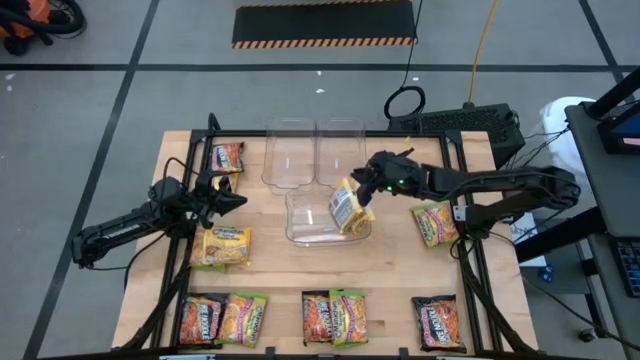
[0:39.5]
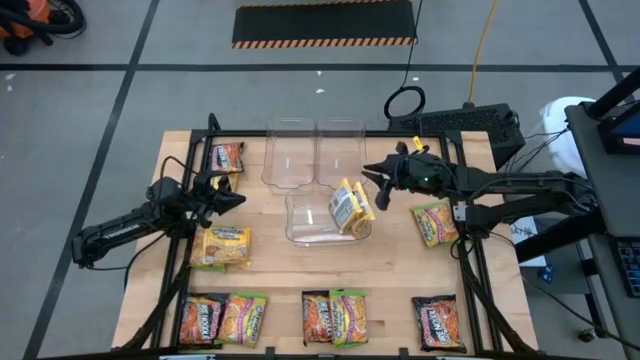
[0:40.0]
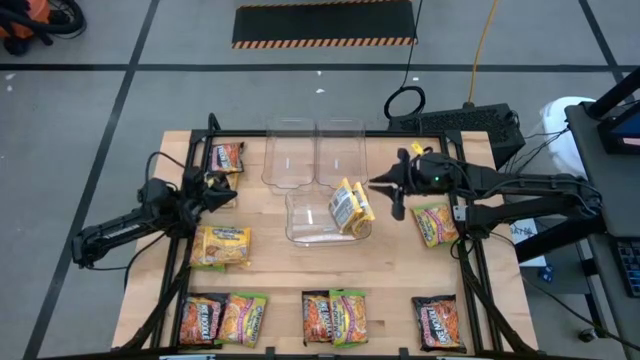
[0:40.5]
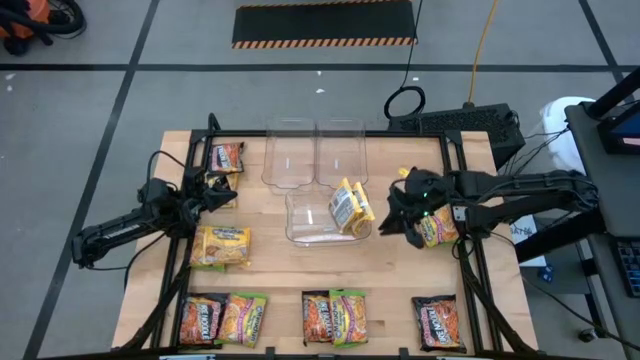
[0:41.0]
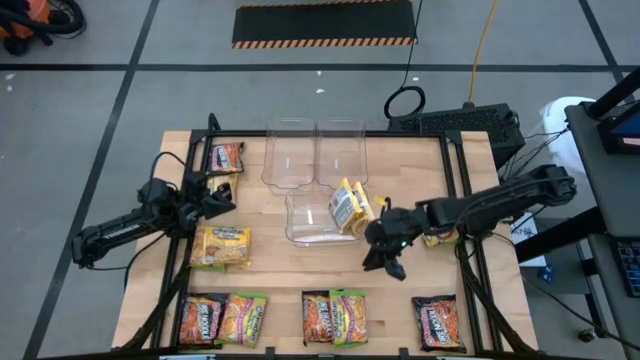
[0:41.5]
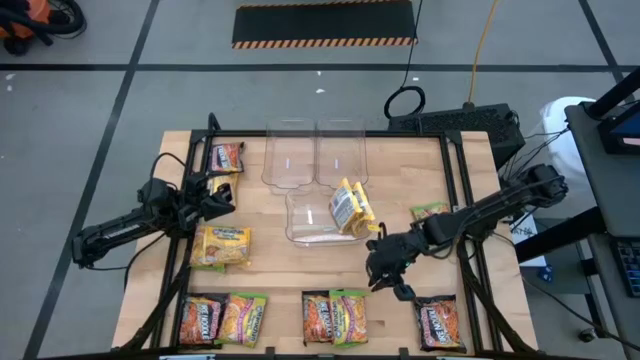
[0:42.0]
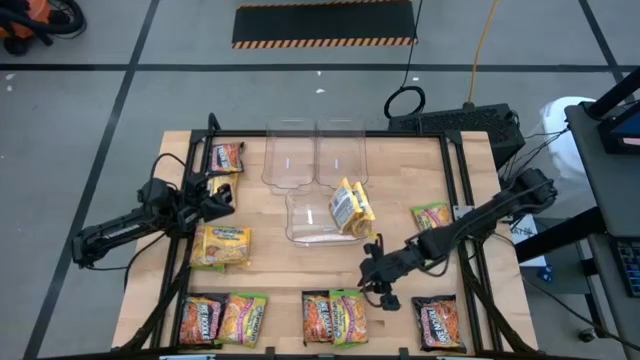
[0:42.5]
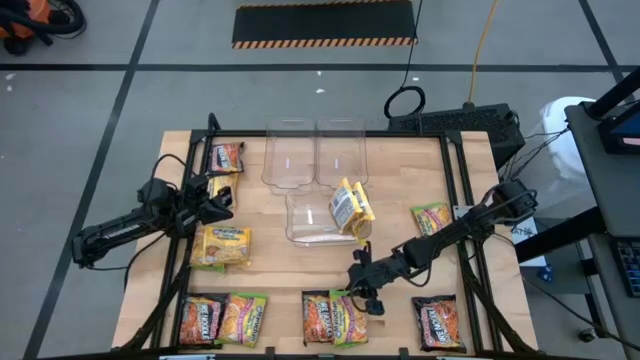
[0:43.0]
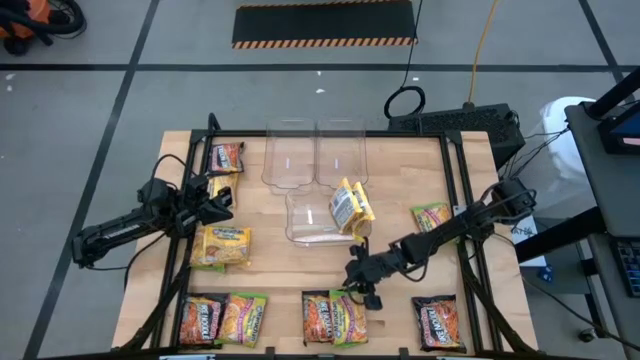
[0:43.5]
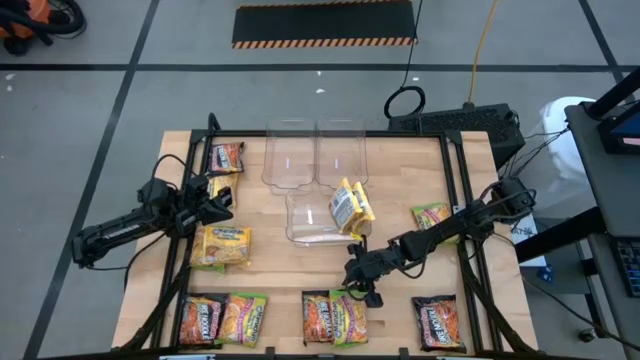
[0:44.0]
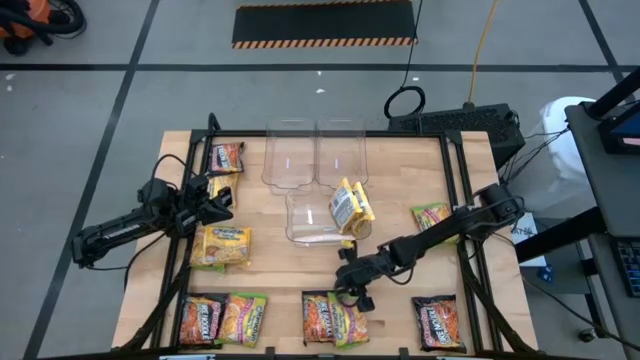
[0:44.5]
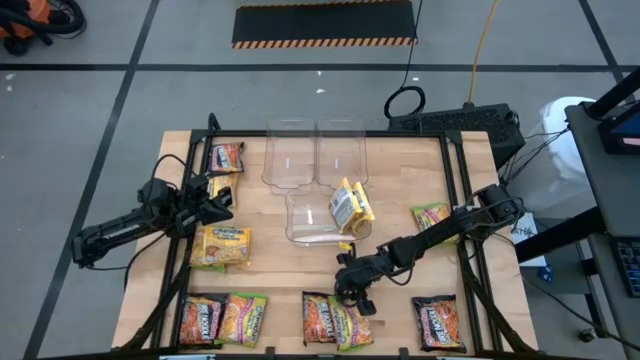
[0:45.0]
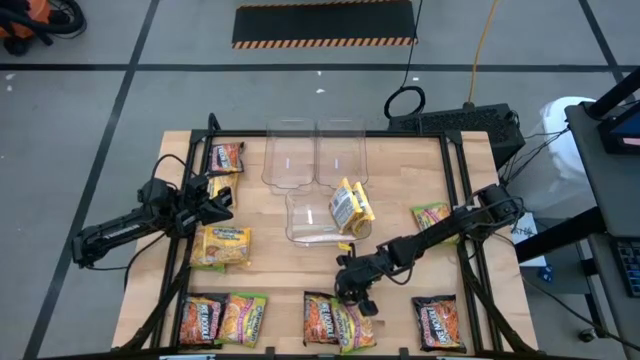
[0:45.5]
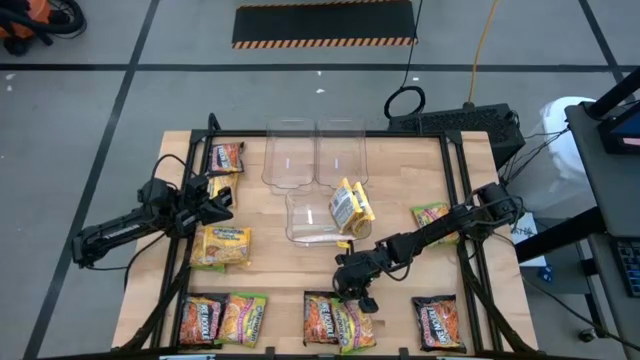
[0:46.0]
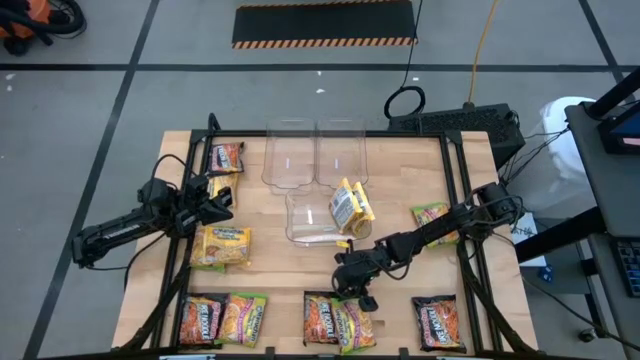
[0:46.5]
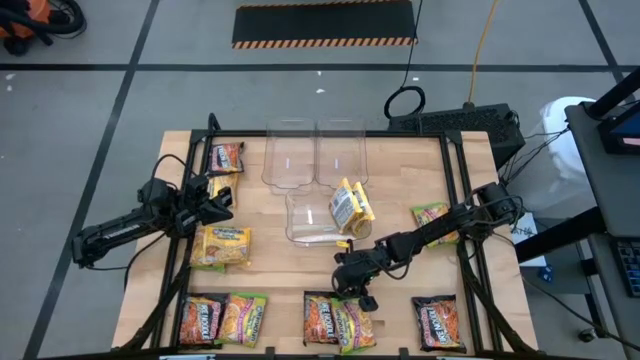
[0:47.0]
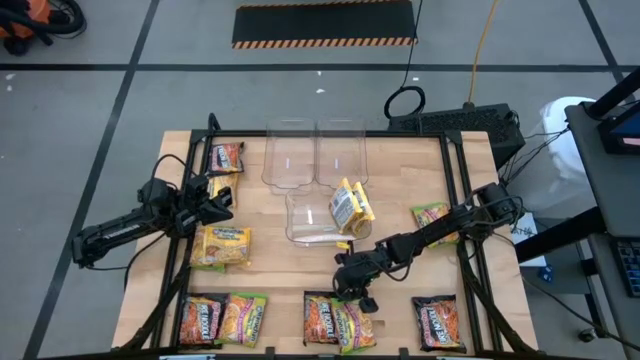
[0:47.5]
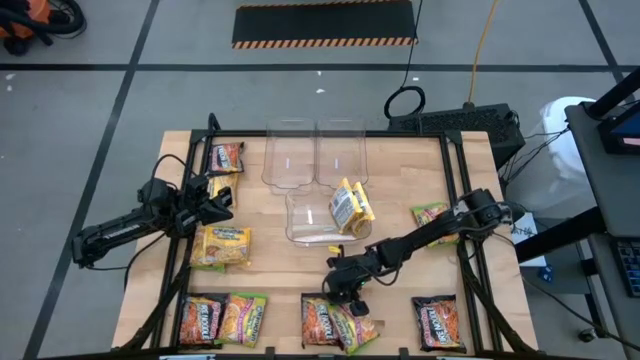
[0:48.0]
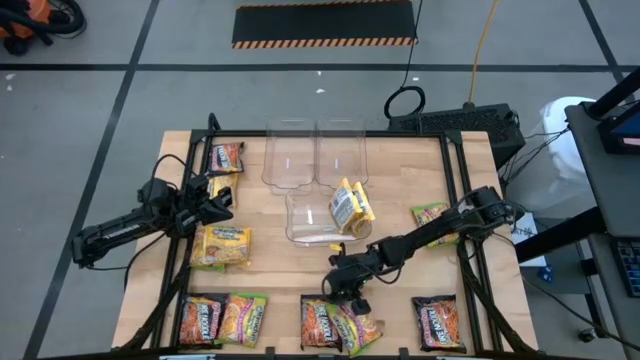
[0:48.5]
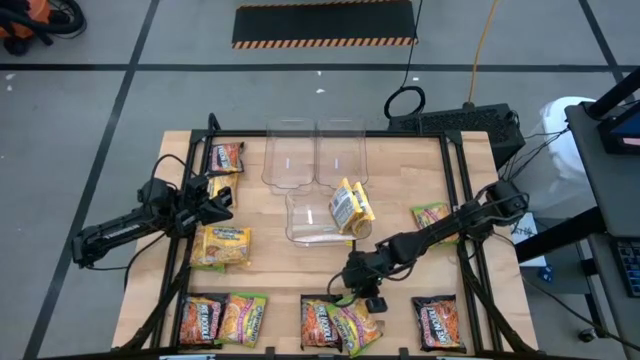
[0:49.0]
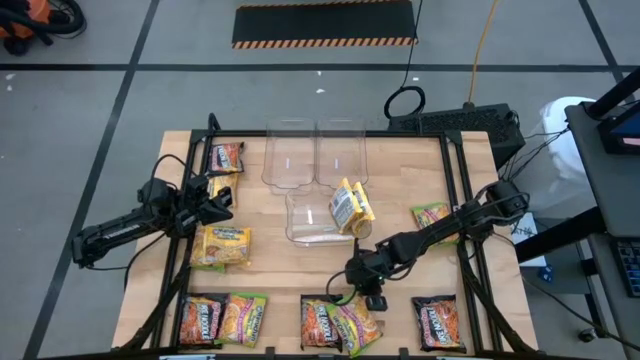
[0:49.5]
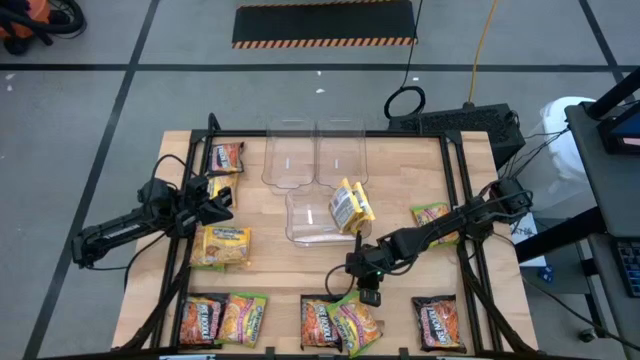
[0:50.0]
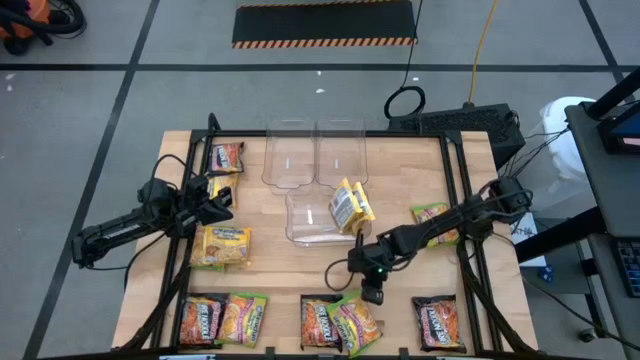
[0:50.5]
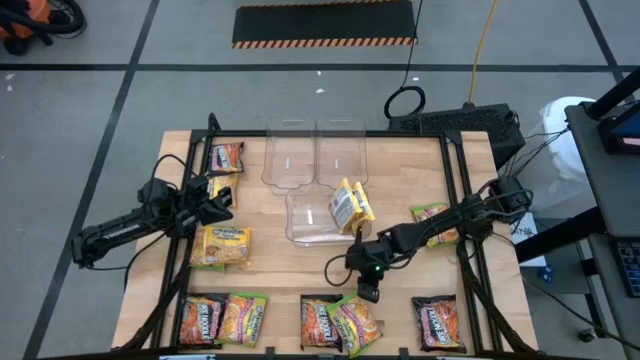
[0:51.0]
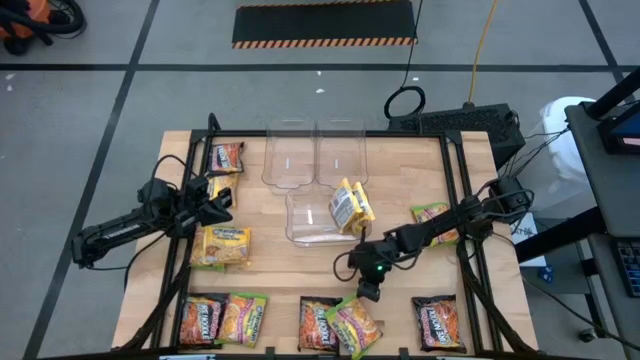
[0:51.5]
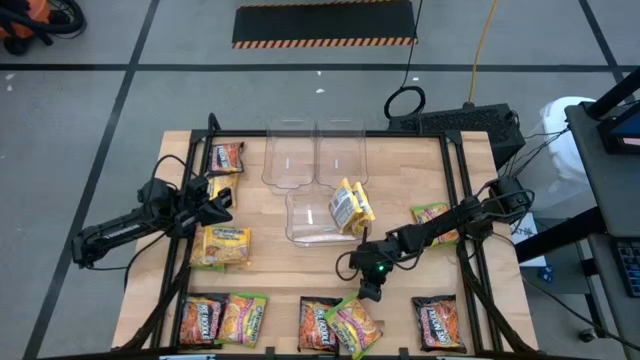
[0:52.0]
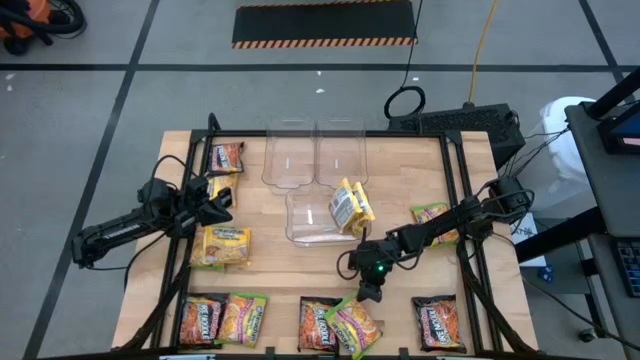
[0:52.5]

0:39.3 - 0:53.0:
Task: Sort Maruchan noodles
Put the green noodle pack into the top right transparent bin
